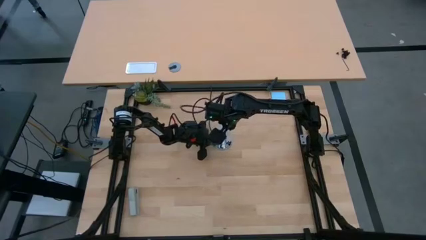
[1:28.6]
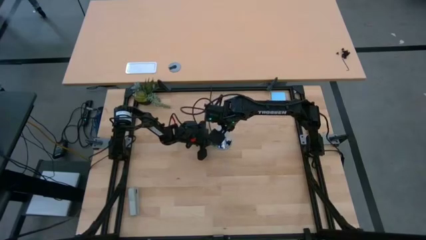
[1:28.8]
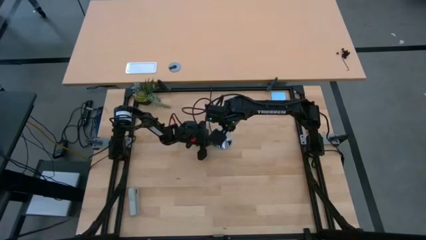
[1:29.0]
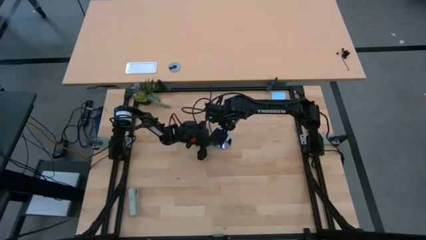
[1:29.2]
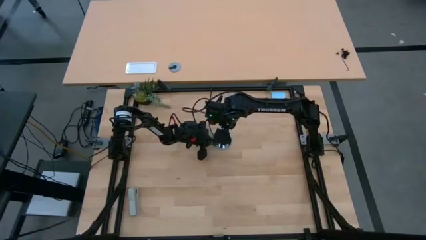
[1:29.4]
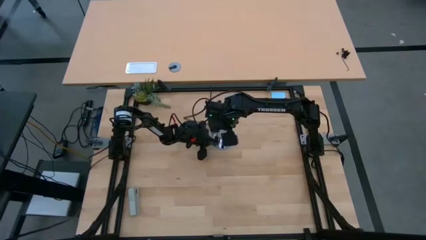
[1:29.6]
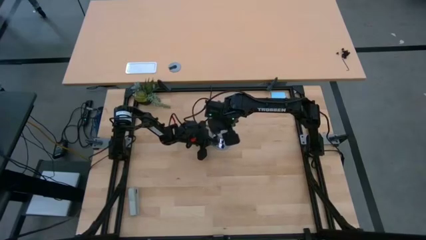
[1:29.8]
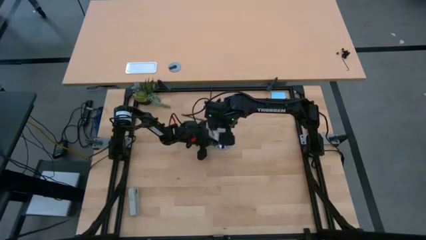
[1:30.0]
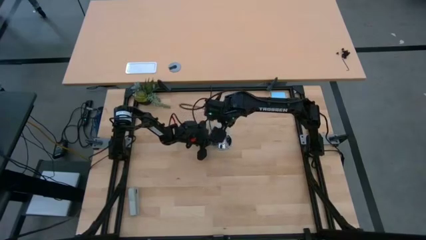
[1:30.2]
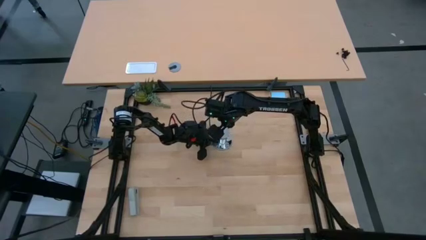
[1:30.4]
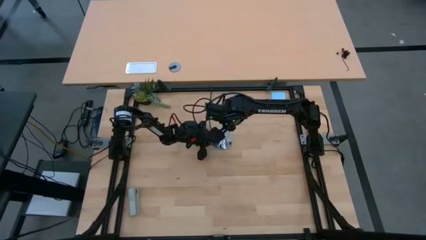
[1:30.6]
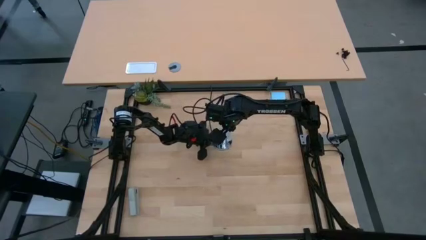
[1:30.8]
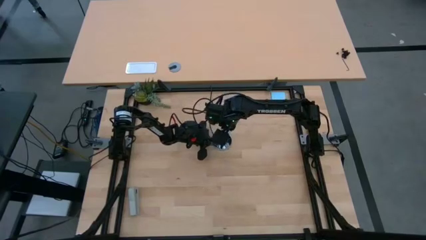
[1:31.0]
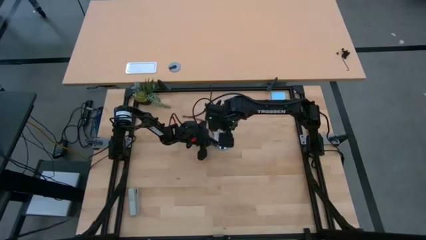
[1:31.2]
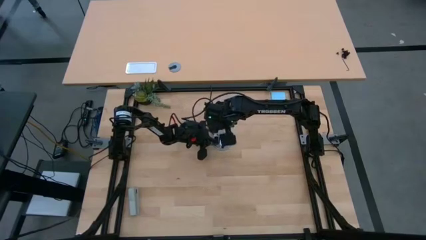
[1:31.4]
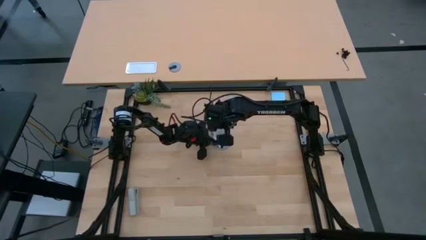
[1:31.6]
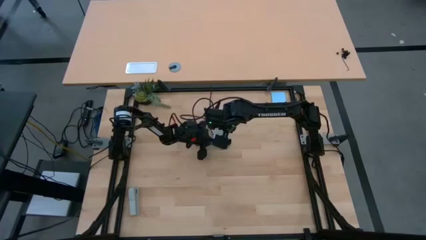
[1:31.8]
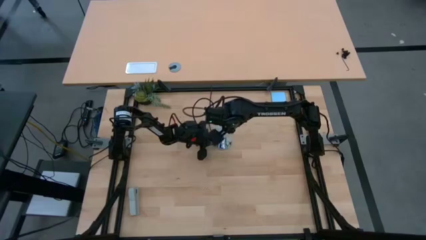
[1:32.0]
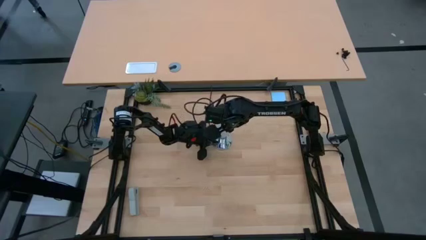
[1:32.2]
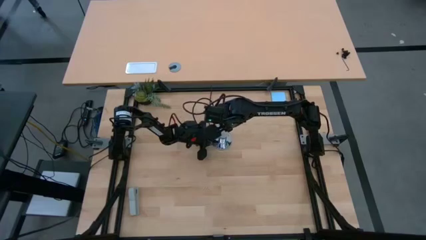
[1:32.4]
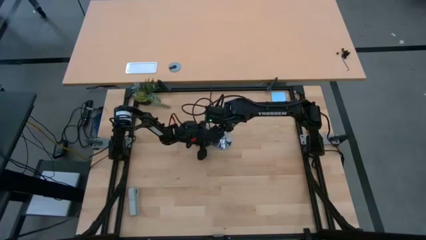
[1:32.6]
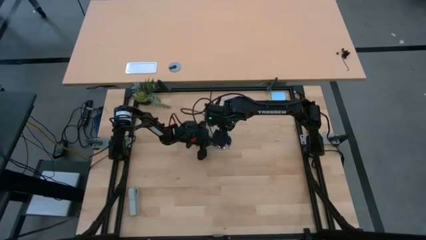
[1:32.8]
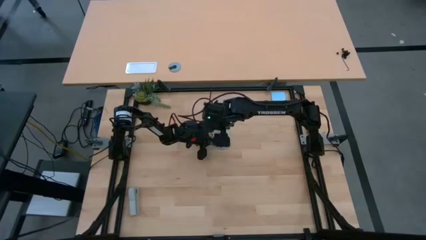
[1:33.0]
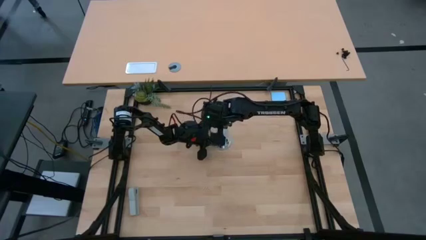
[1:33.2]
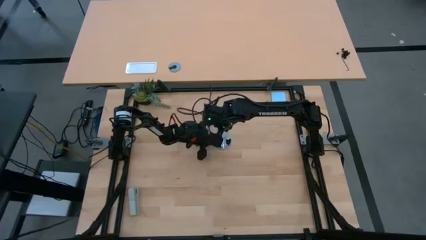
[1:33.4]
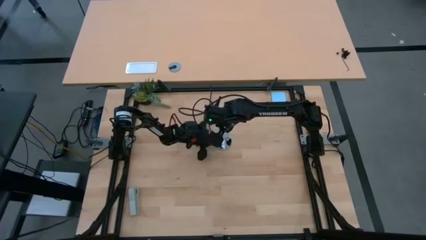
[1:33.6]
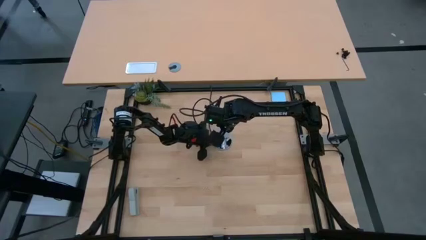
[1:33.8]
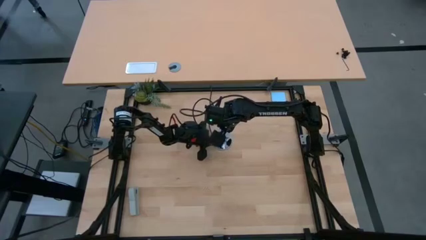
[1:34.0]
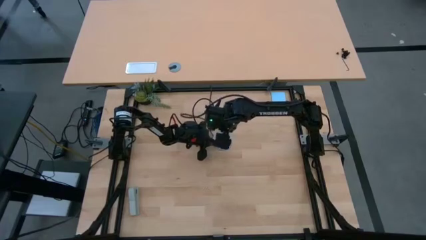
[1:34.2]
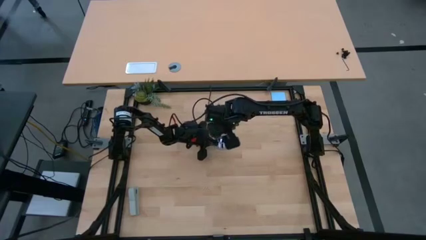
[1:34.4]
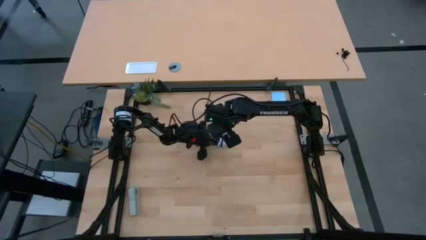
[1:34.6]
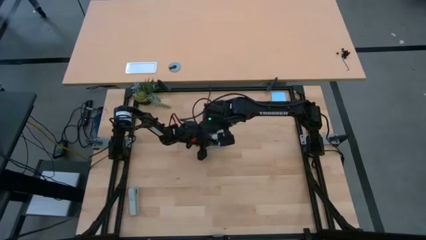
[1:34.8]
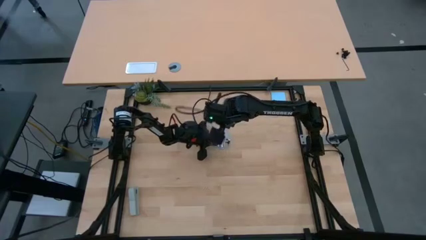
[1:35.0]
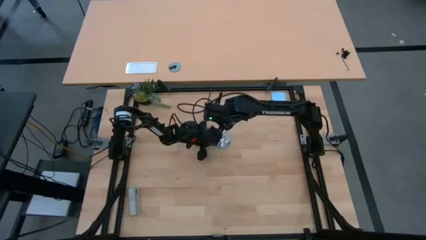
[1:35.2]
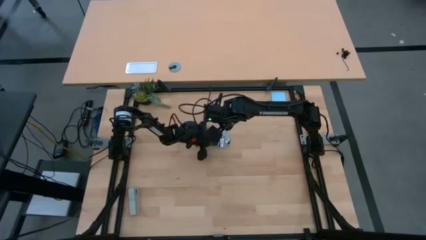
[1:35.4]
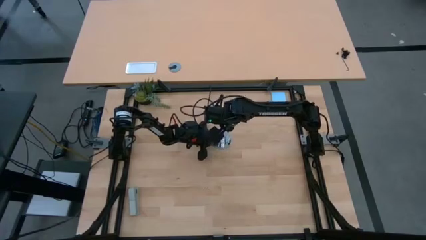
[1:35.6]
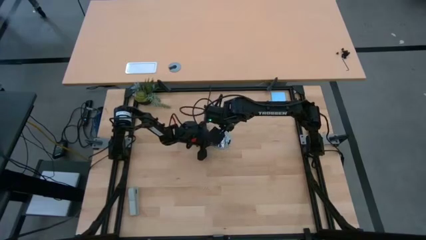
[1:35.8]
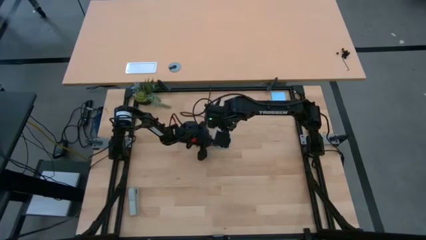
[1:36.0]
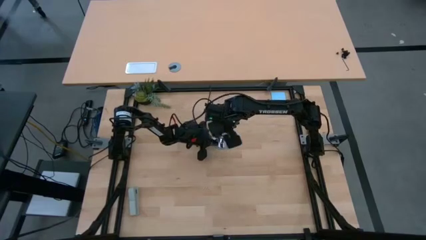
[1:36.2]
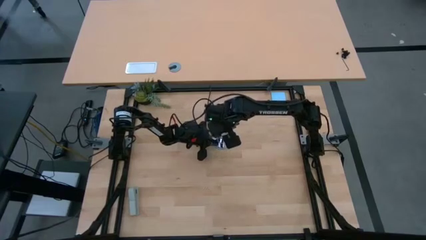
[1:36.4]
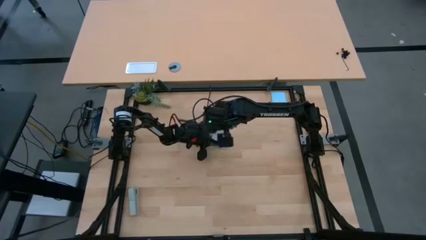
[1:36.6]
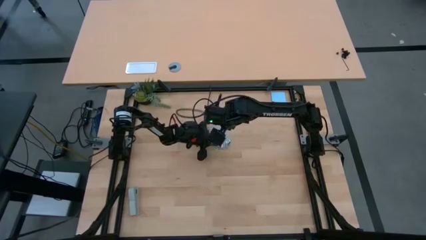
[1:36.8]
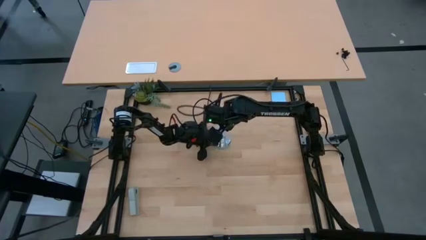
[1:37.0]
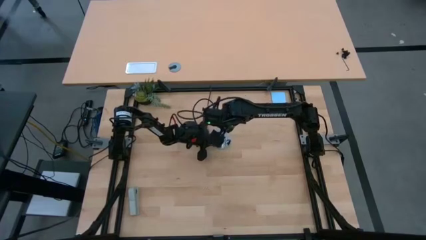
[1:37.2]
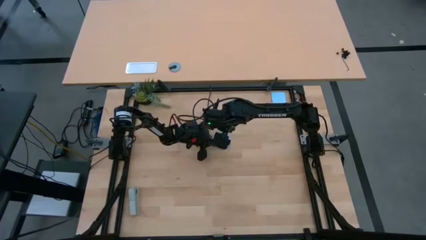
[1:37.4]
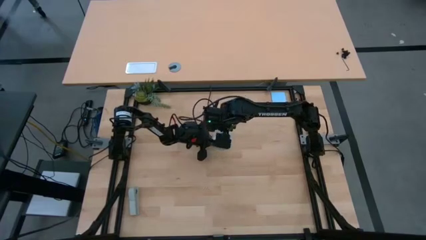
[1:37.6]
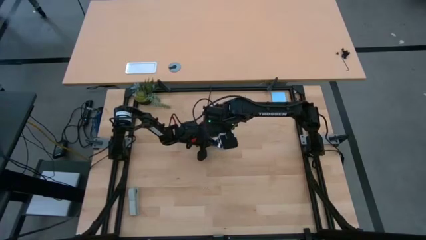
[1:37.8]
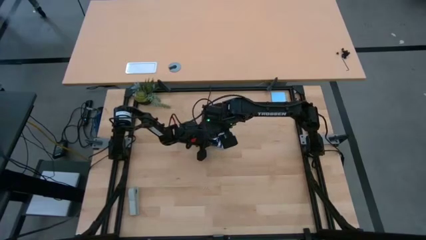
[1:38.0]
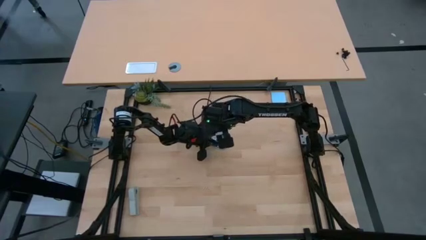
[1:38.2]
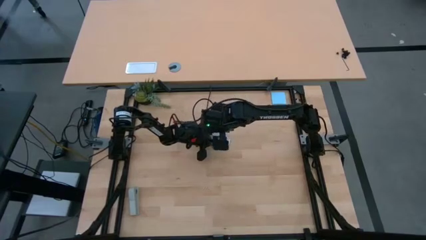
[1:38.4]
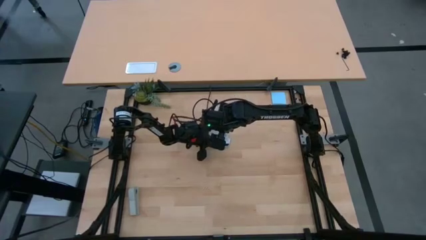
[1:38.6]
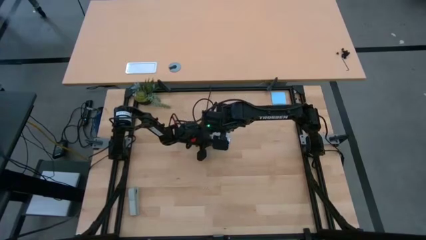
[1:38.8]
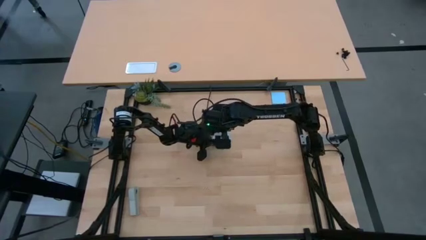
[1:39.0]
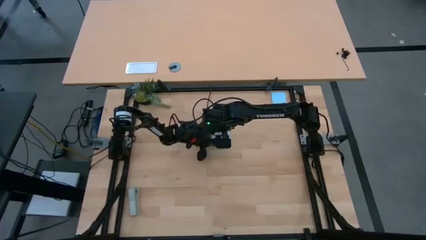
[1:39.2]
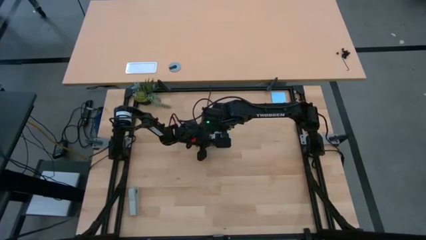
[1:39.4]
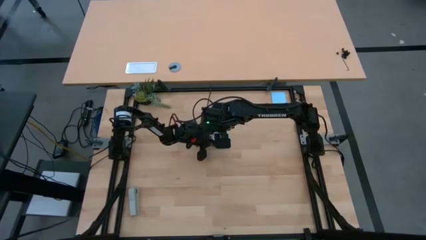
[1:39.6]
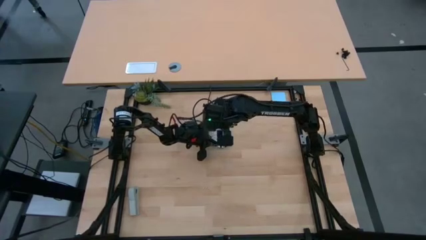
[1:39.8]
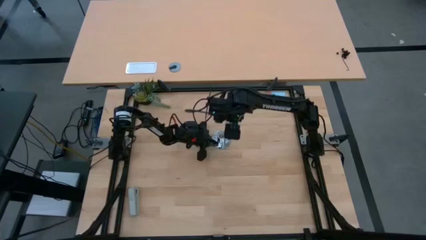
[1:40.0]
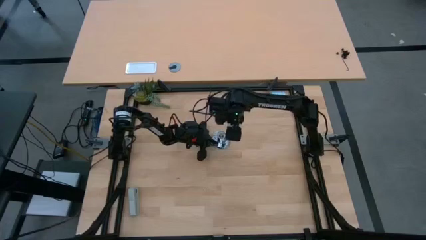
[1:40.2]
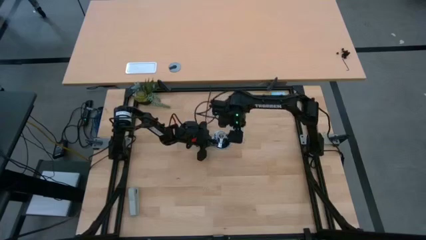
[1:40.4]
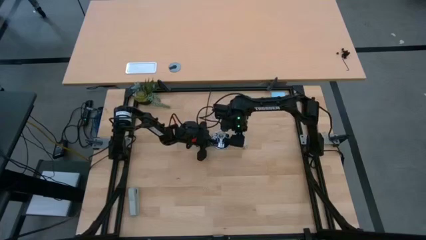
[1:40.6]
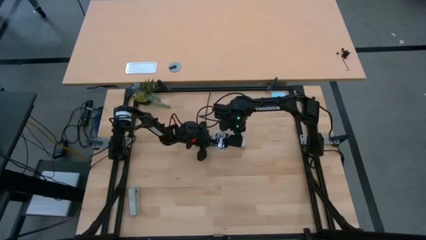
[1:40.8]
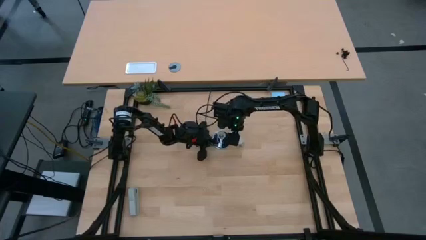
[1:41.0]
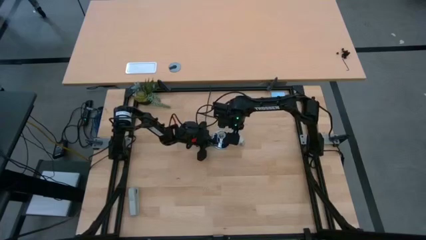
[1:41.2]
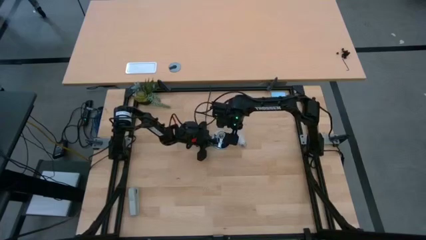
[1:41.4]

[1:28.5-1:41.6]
Task: Screw lightbulb
Remove the white lightbulb from the silver lamp
